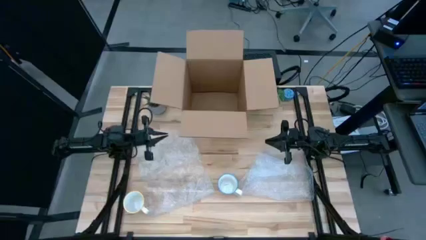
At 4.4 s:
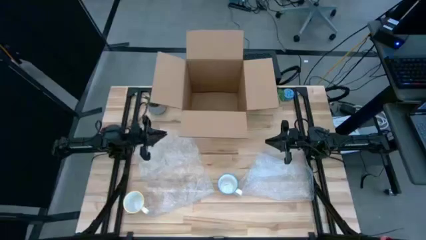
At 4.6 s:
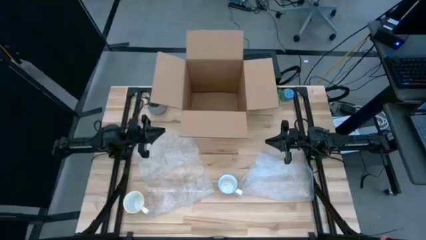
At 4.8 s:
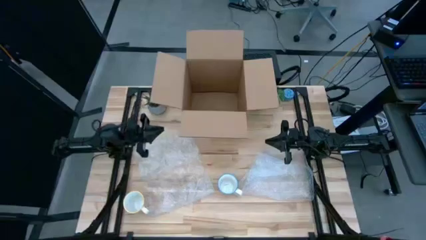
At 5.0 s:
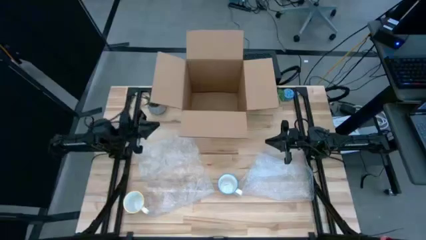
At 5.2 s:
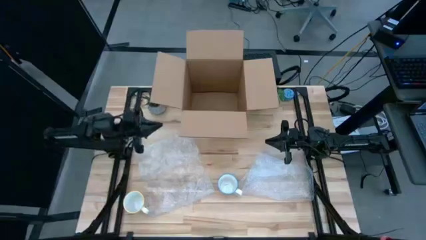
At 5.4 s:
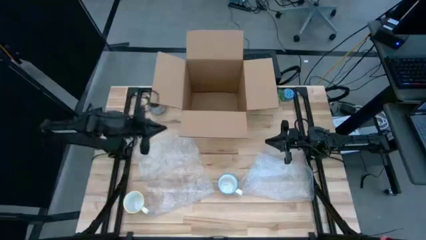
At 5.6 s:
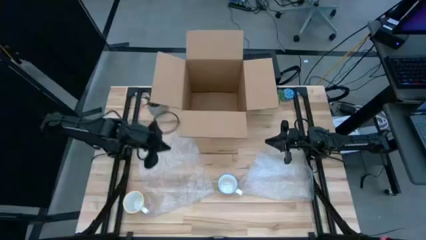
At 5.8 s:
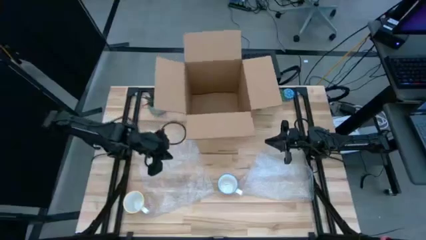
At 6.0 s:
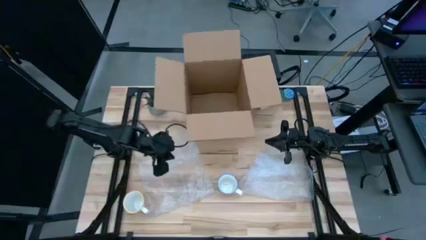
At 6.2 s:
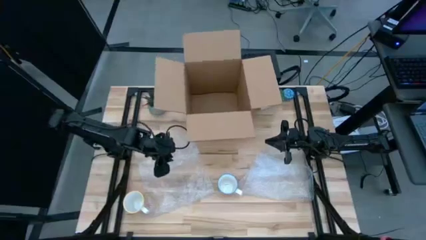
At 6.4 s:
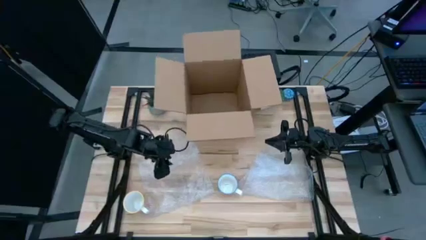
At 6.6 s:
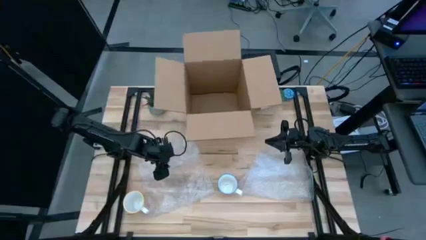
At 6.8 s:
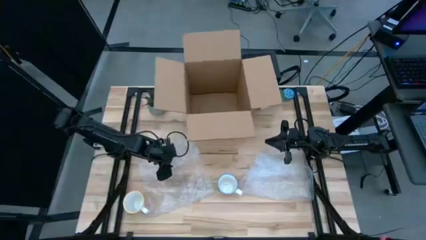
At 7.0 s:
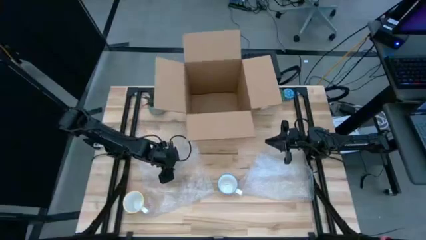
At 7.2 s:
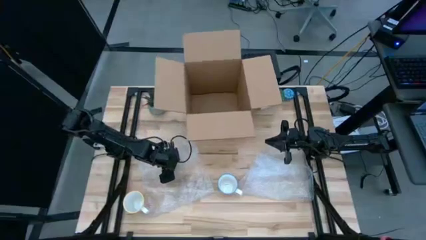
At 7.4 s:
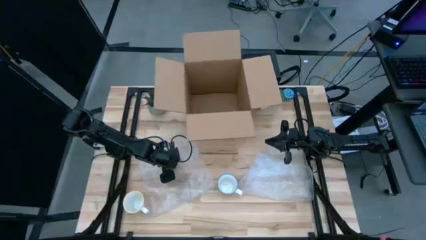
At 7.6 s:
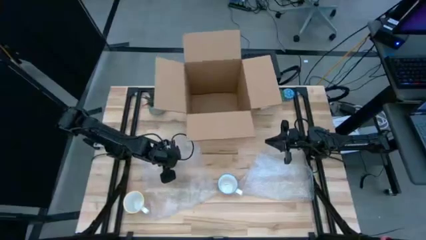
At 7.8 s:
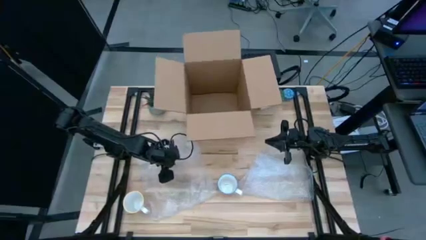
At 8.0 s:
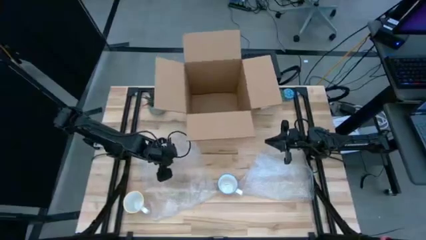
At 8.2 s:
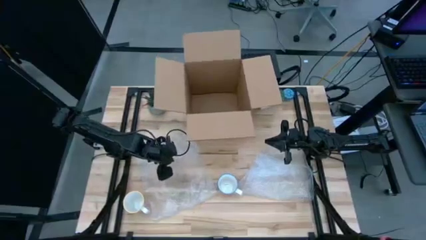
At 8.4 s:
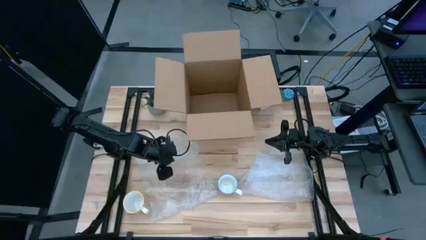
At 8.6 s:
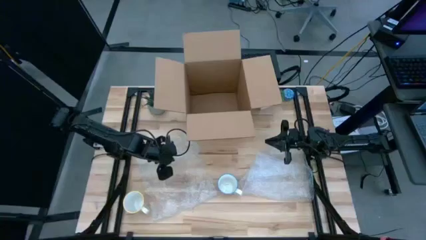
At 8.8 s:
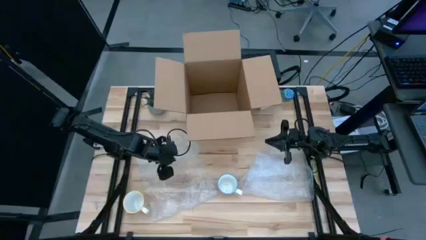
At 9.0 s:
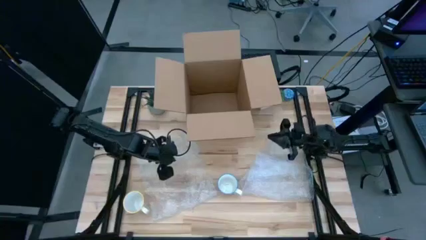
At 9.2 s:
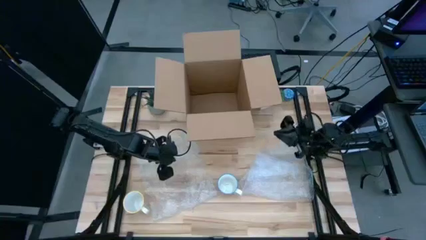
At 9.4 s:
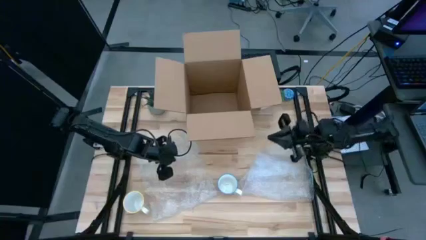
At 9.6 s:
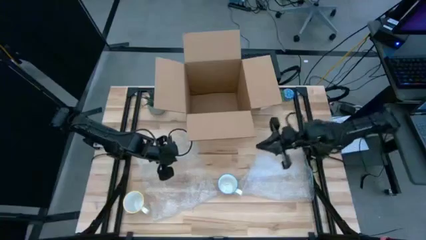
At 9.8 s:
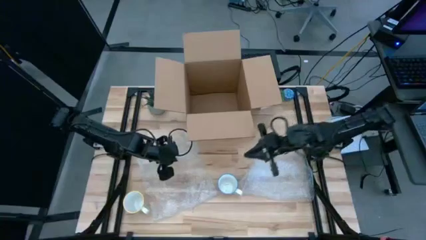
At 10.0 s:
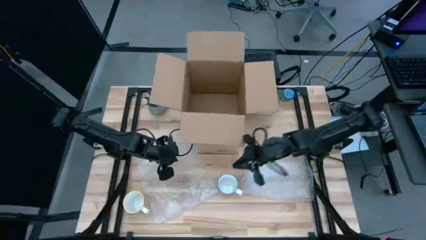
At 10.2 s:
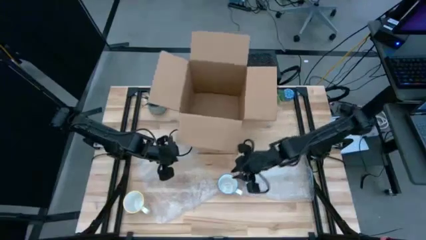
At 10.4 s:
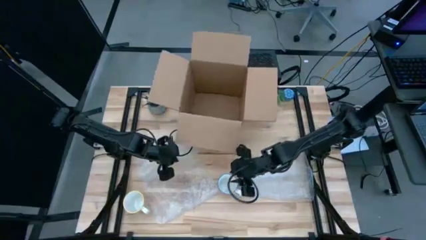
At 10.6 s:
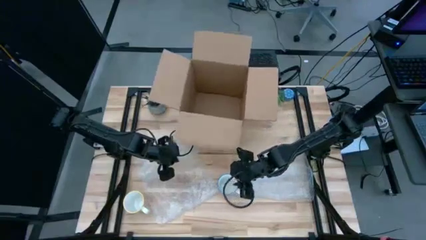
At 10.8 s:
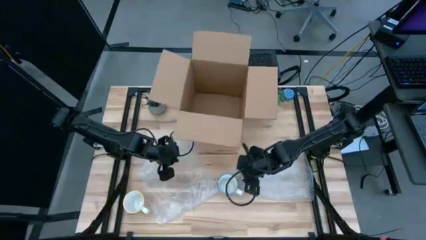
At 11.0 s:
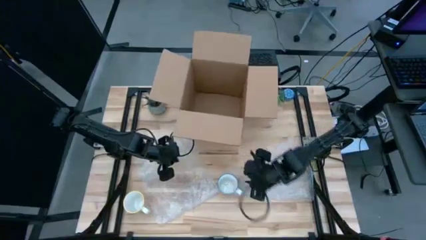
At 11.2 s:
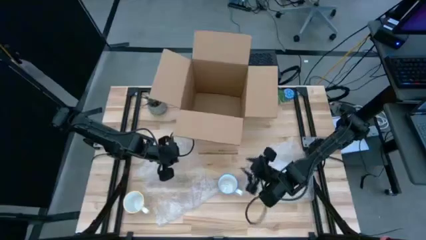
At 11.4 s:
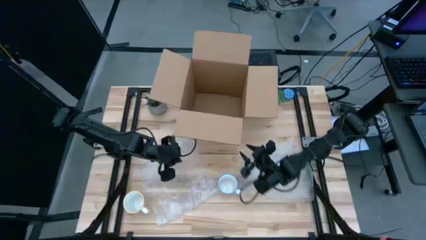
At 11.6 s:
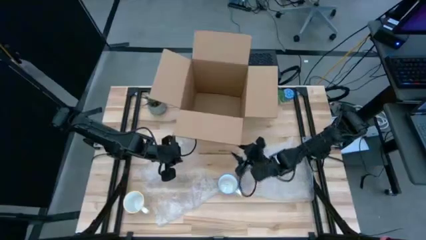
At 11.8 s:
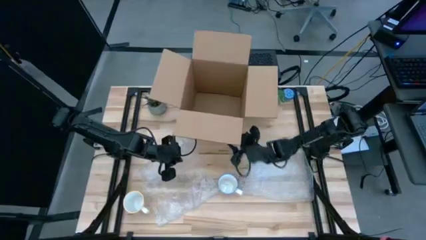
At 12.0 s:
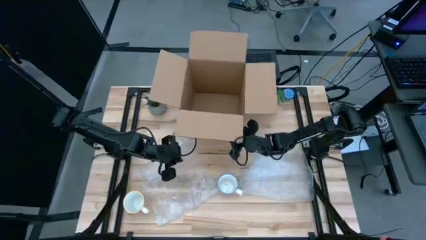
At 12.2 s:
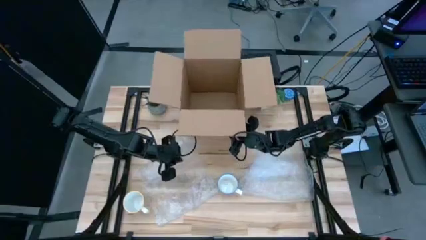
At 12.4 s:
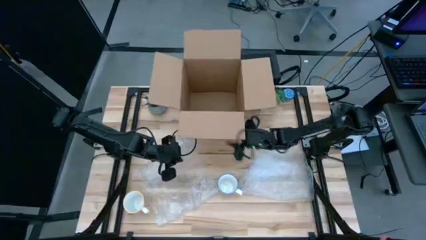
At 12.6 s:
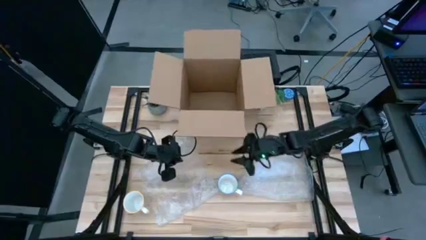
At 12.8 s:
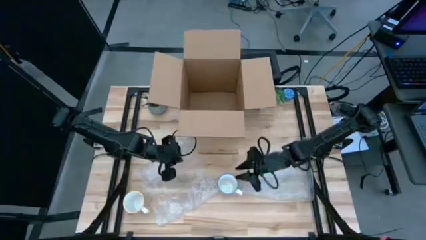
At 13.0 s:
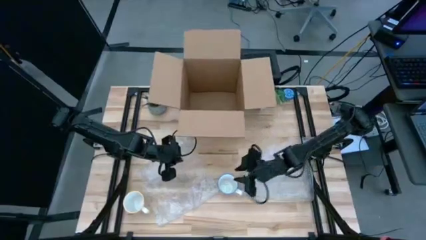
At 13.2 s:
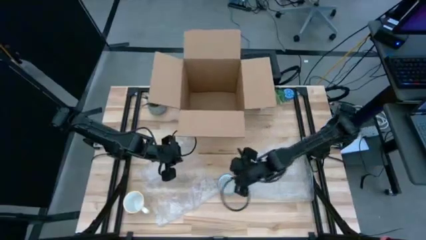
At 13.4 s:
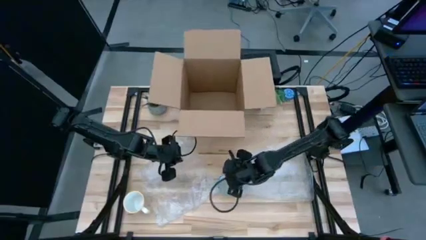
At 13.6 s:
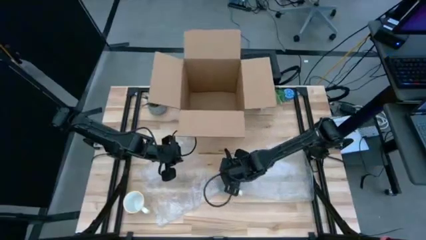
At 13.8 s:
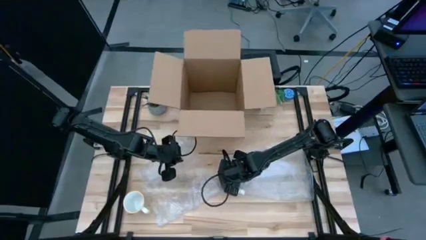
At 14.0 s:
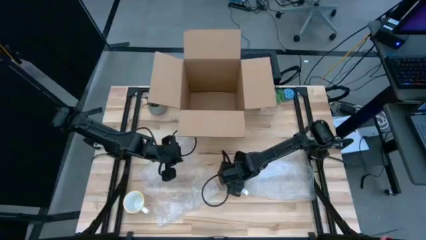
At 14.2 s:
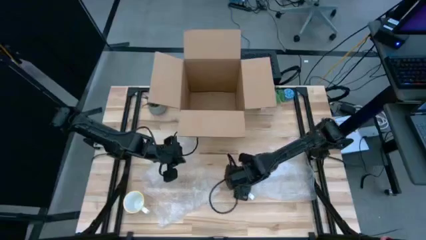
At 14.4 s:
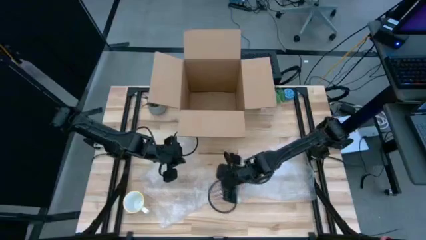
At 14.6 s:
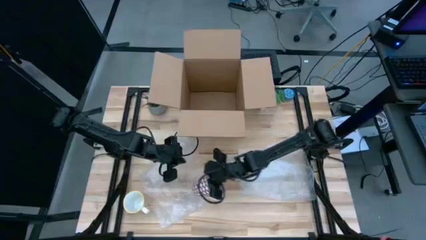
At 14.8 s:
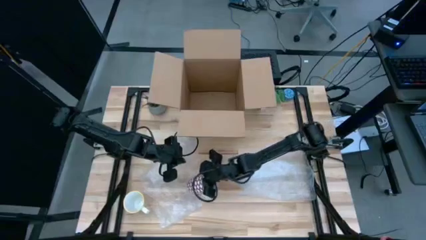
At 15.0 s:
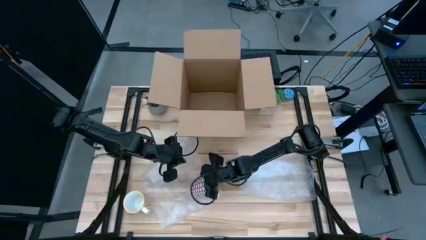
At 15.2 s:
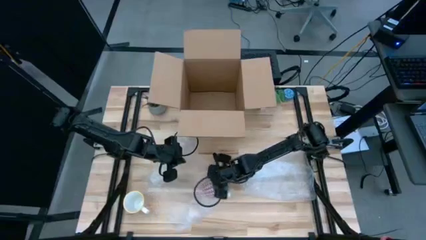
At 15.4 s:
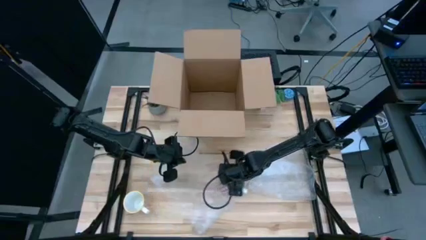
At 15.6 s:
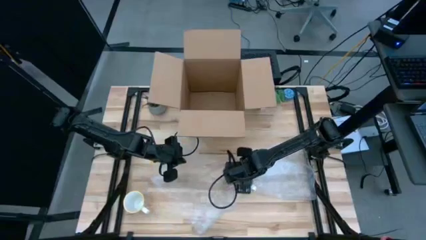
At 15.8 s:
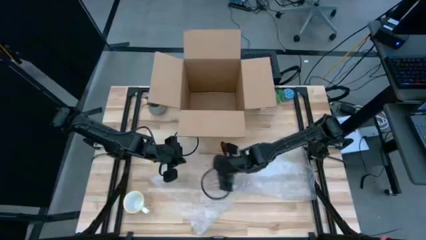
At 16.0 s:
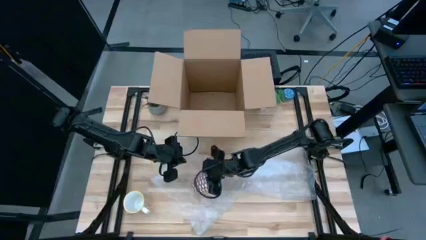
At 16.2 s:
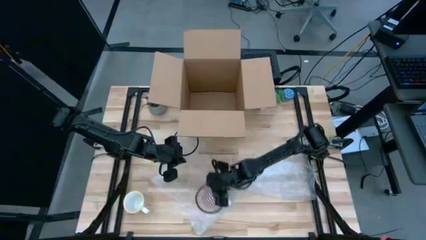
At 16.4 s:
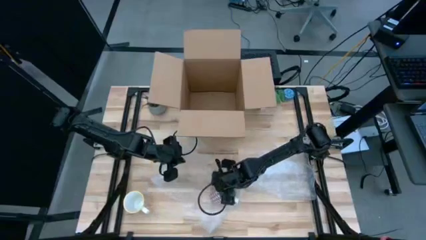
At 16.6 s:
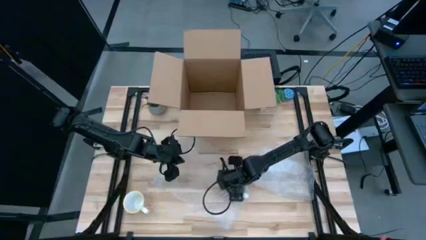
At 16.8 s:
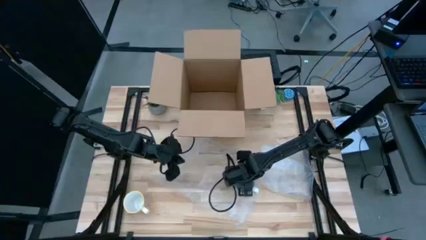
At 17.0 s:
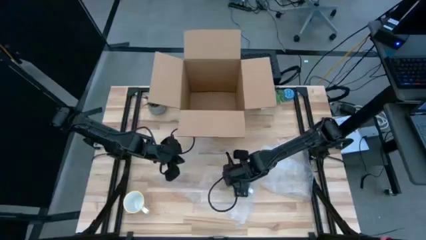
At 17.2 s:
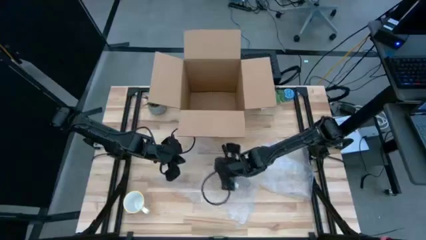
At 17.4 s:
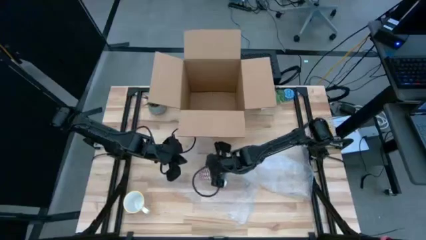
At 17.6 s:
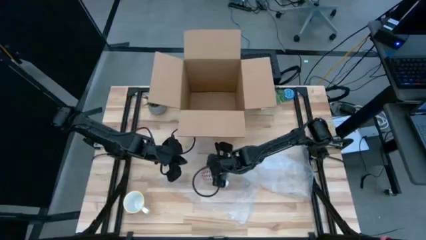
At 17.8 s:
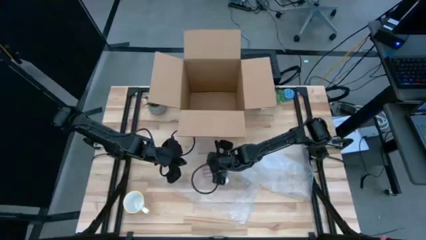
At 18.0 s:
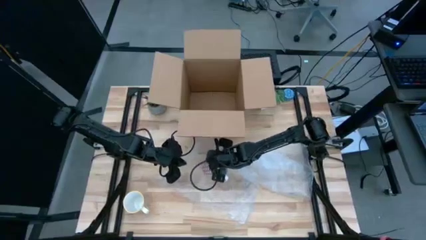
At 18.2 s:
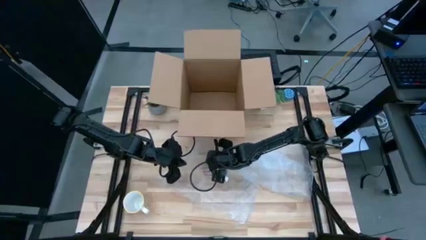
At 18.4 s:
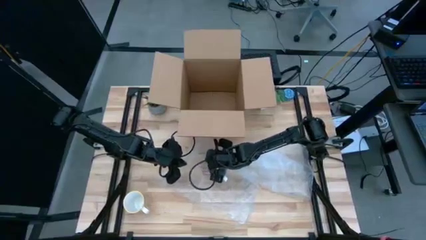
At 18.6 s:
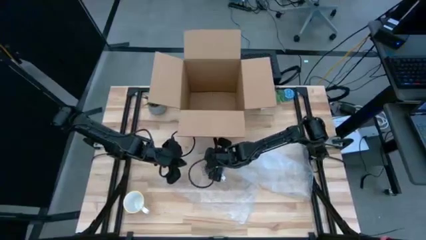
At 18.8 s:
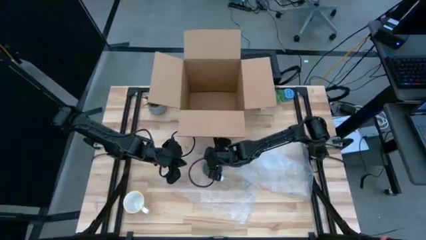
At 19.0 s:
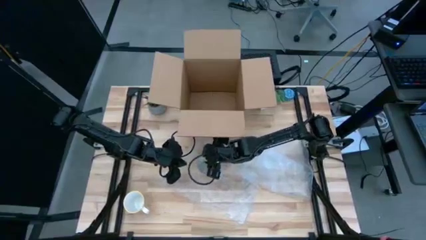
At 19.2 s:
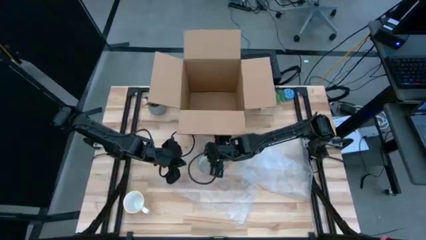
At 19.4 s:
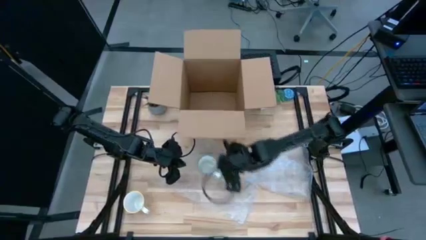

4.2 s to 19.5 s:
Task: wrap mug
Wrap the red mug with the left bubble wrap
